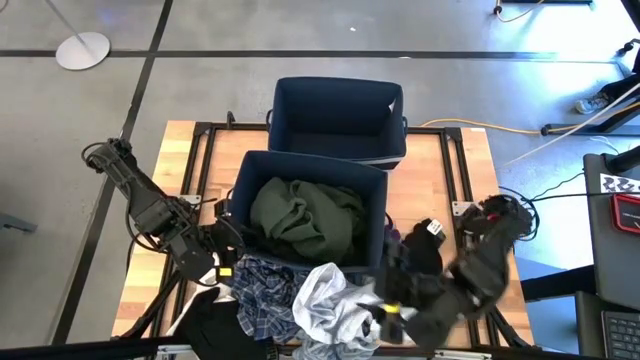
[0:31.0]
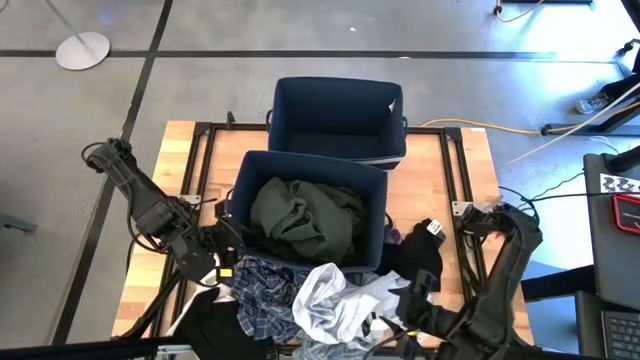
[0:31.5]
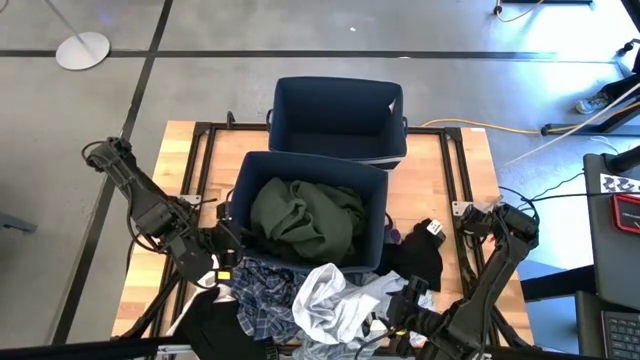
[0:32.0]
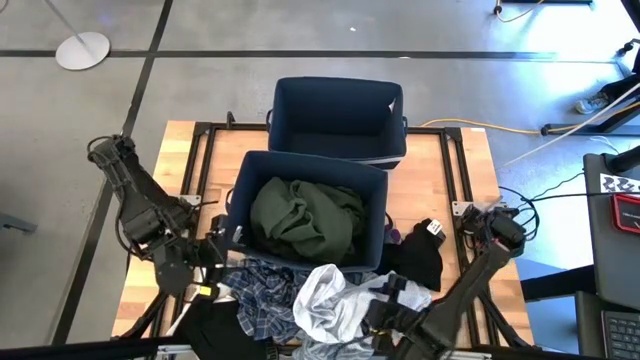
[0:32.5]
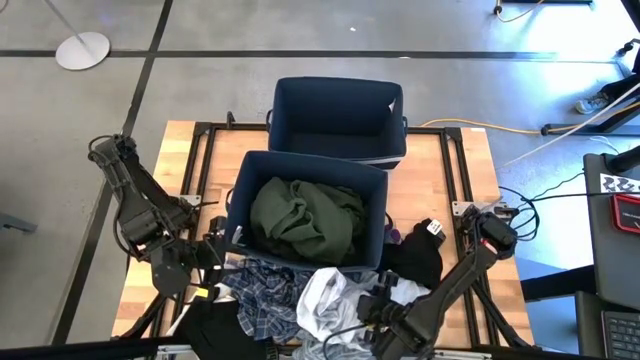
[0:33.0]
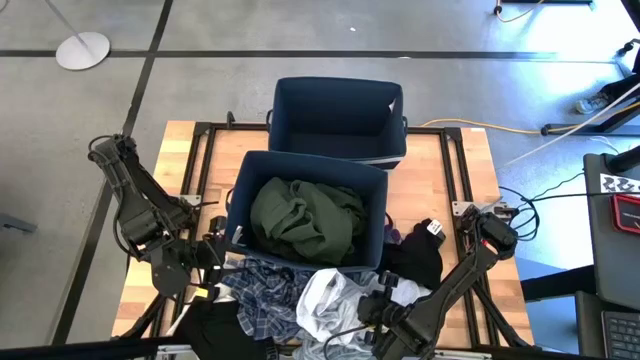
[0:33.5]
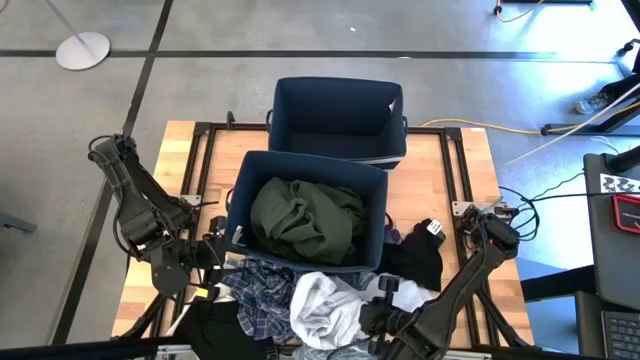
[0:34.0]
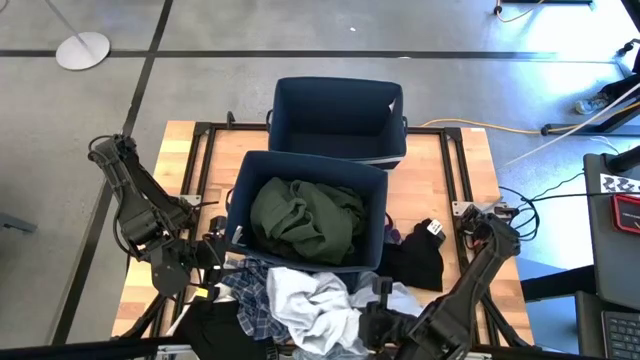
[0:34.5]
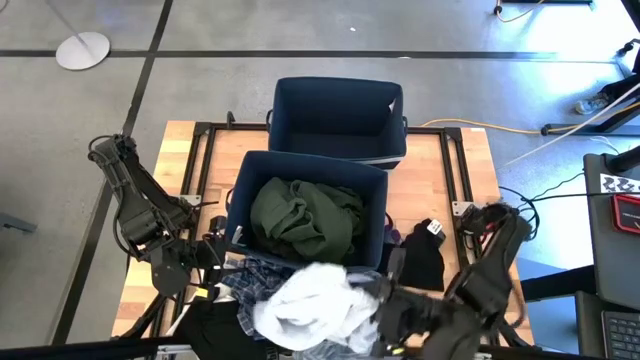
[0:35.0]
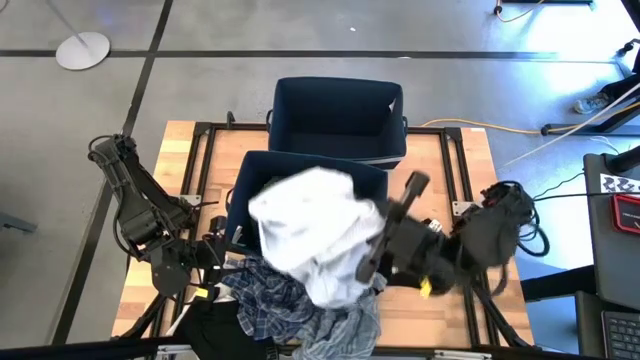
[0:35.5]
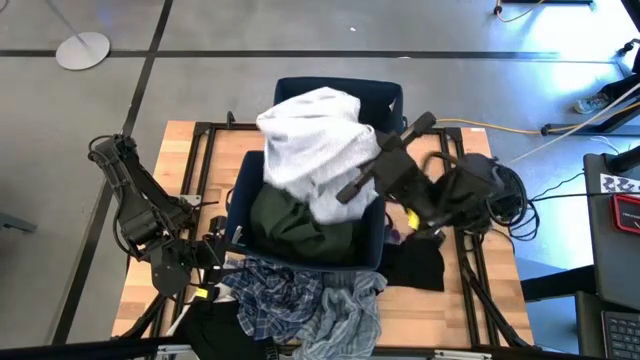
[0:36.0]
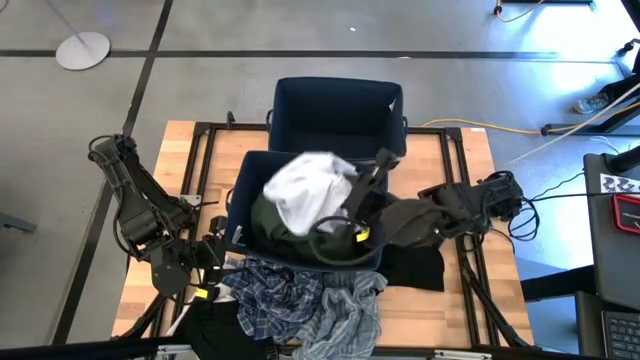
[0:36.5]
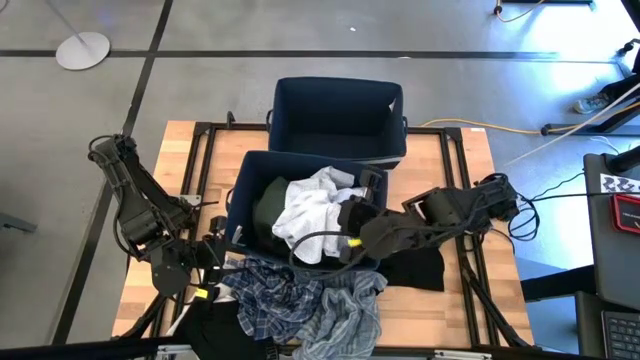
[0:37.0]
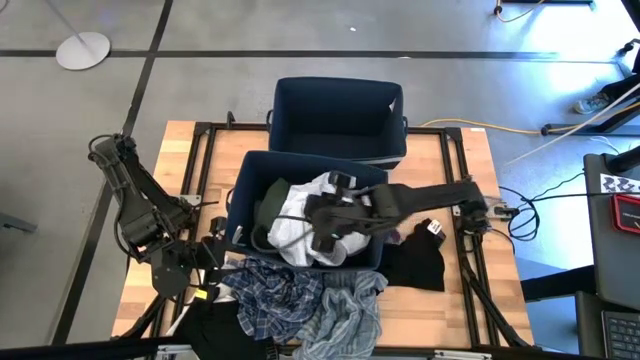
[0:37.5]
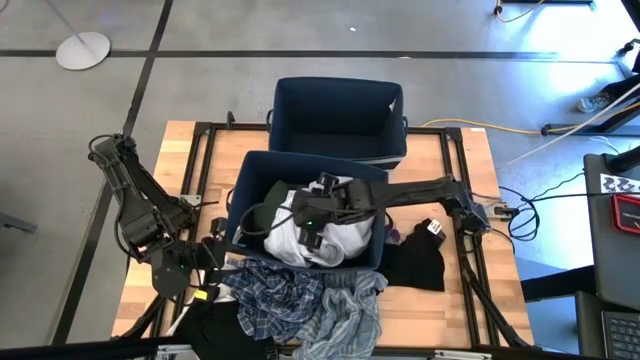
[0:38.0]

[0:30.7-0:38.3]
Task: Sort clothes
Put the light blue polo shirt into the bottom blue laundry bin

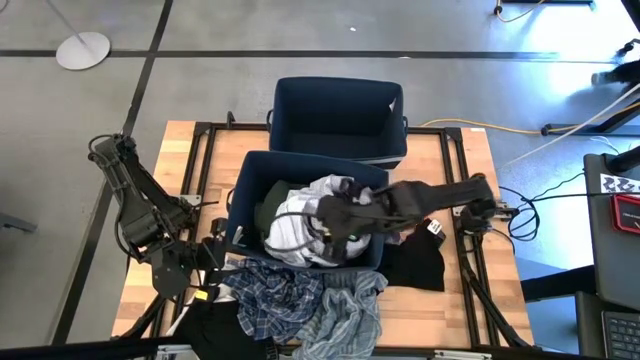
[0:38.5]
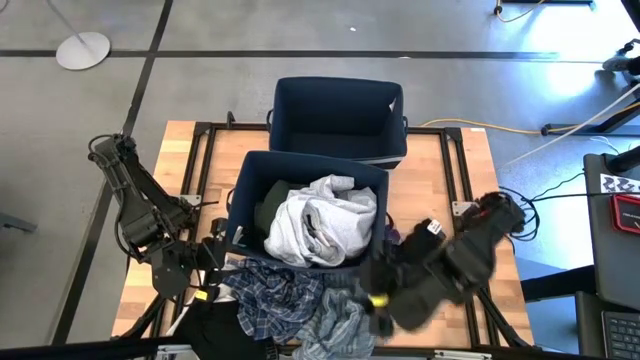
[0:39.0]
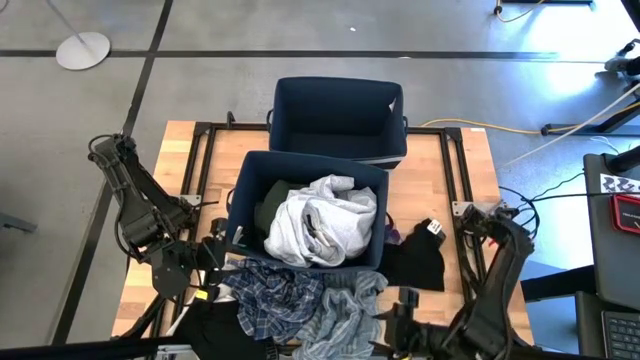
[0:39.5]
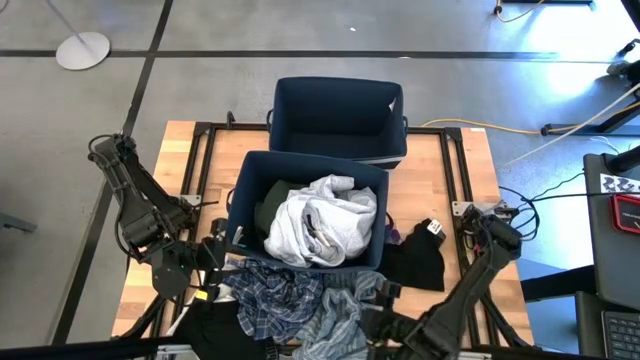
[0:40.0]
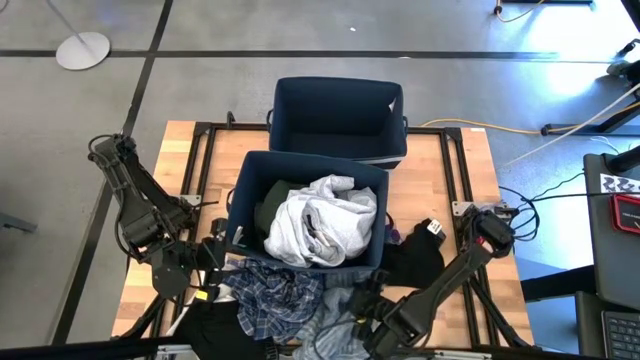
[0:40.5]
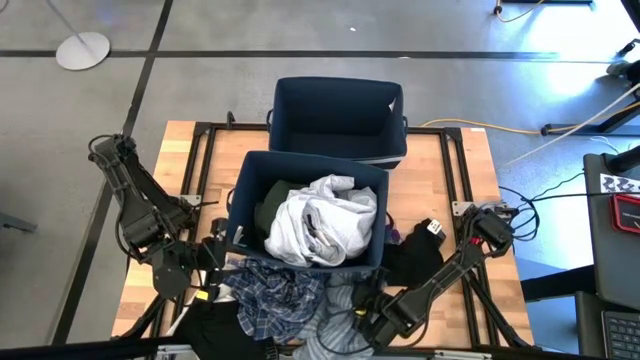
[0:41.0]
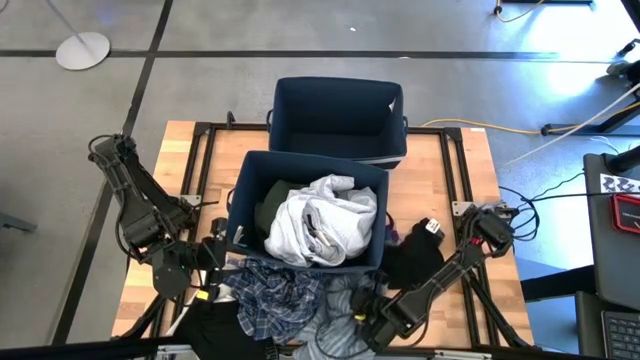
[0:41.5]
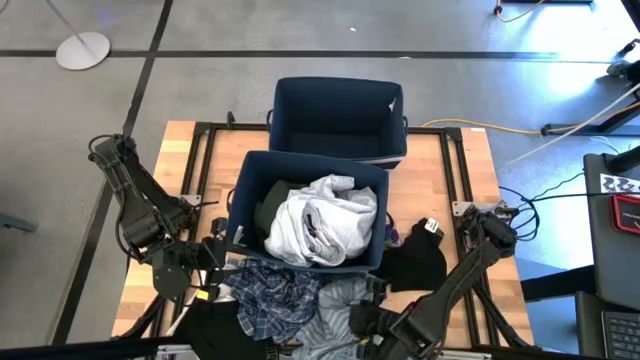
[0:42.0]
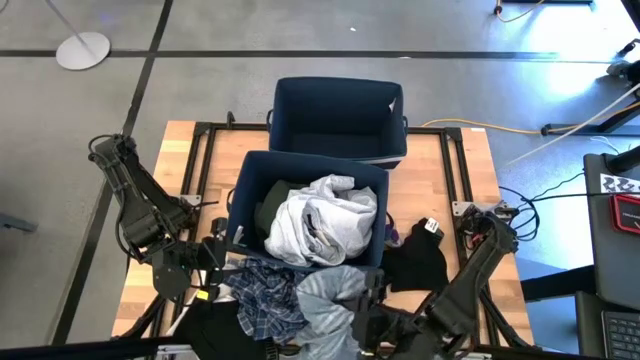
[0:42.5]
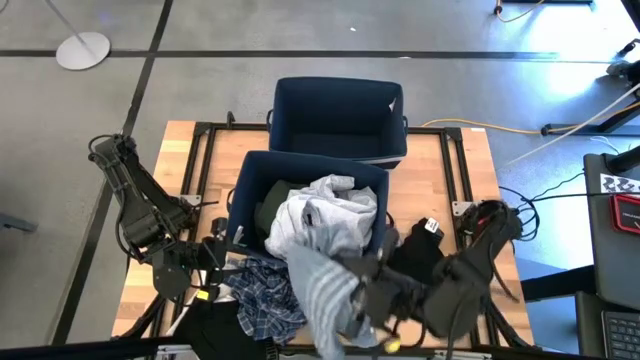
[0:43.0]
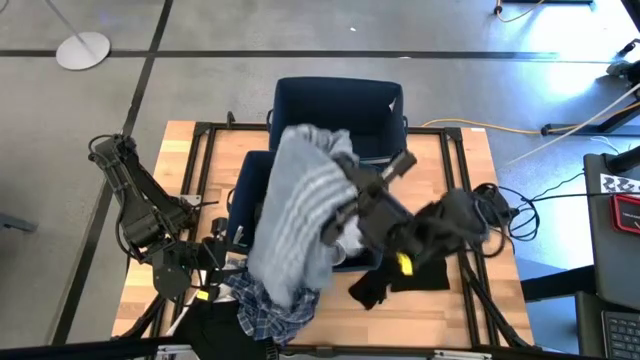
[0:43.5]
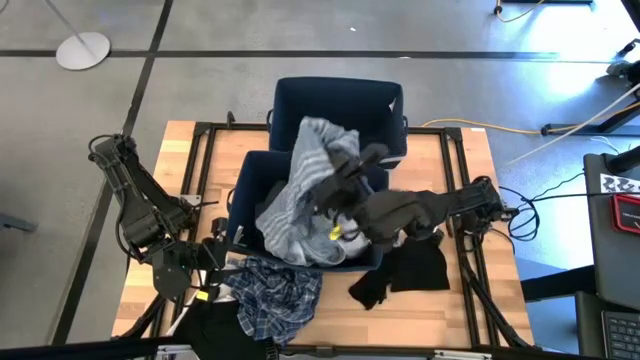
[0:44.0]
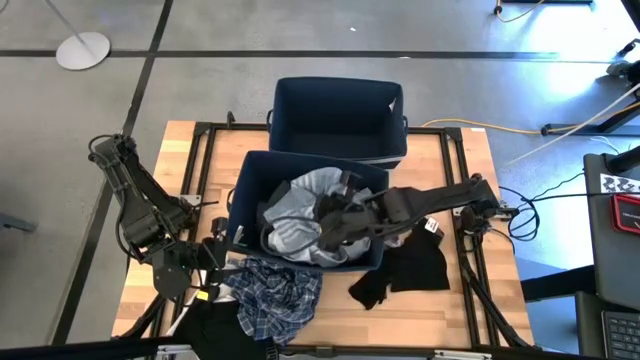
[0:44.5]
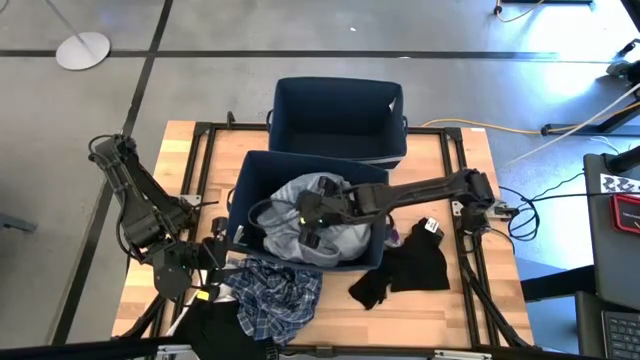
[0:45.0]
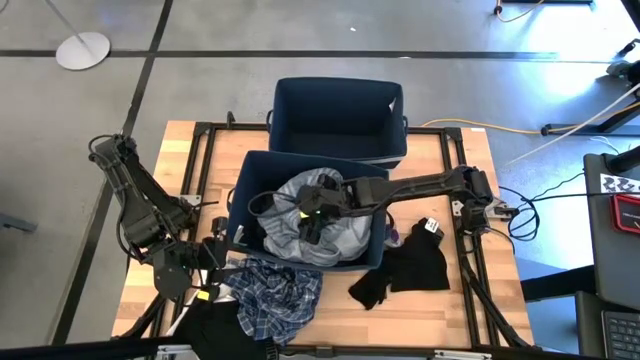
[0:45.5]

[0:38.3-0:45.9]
Put the light blue cloth into the bottom blue laundry bin

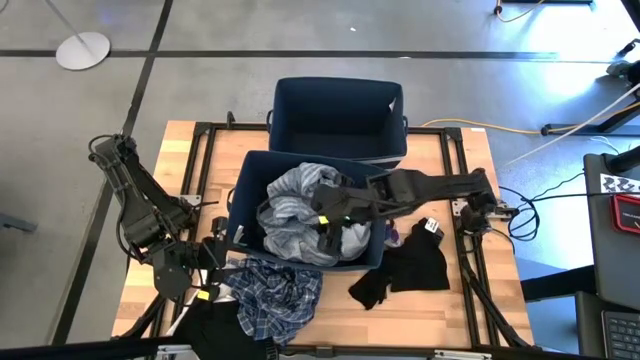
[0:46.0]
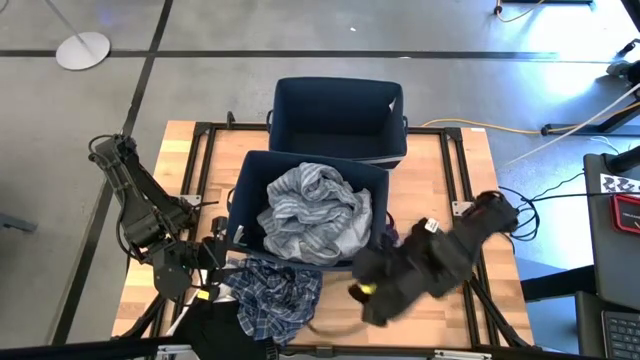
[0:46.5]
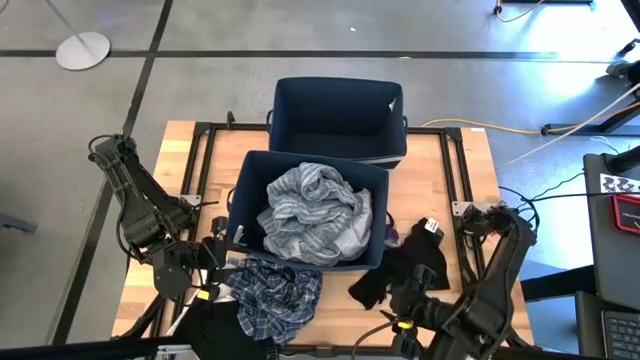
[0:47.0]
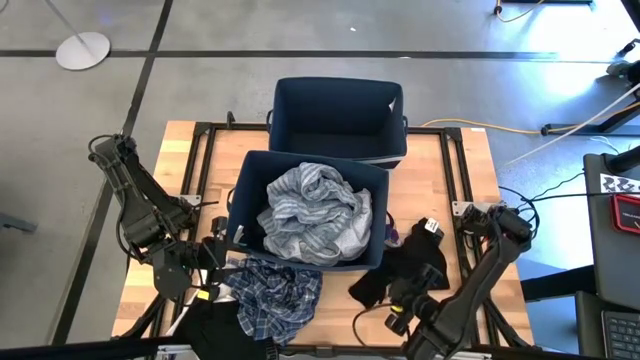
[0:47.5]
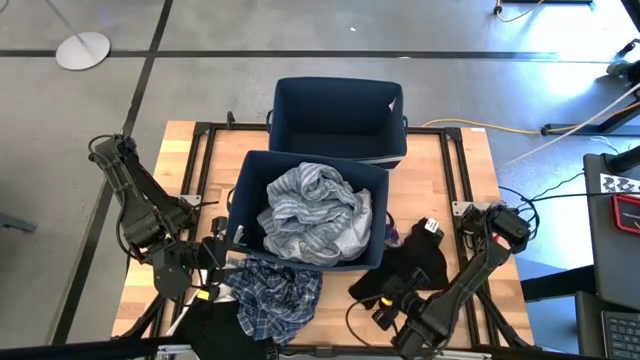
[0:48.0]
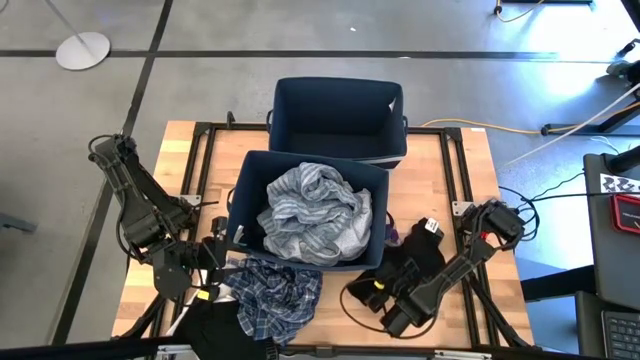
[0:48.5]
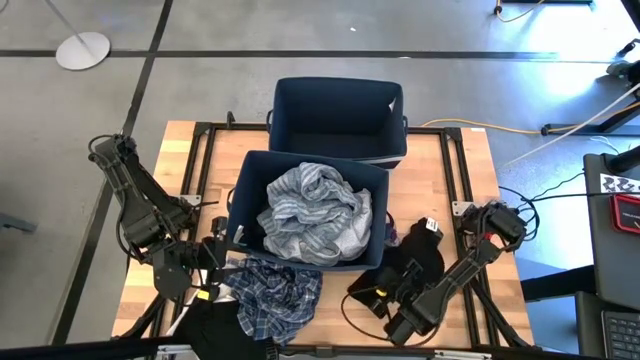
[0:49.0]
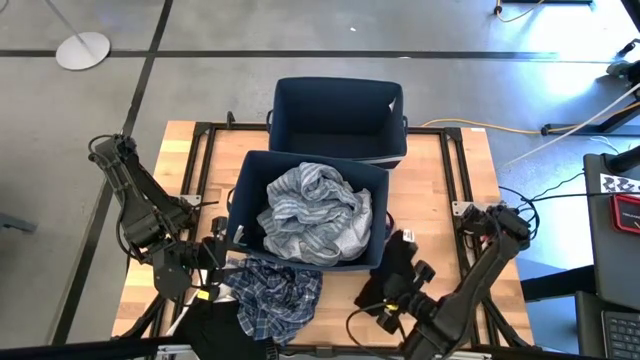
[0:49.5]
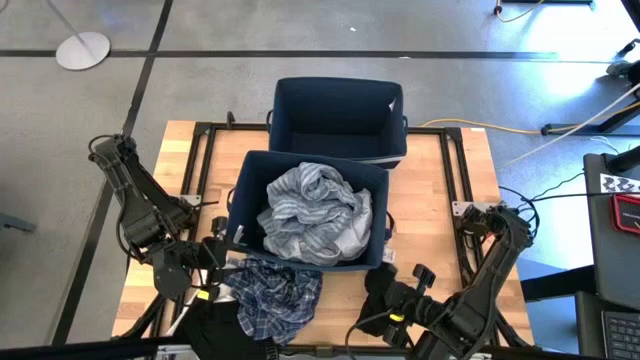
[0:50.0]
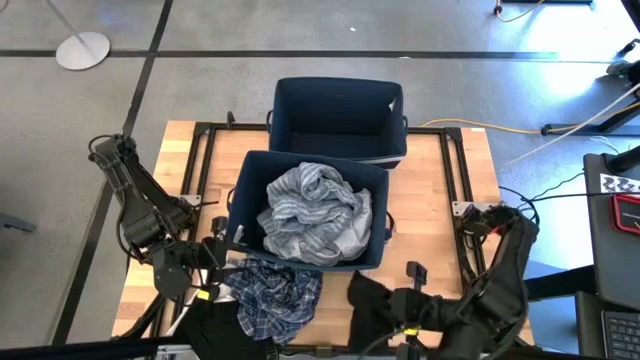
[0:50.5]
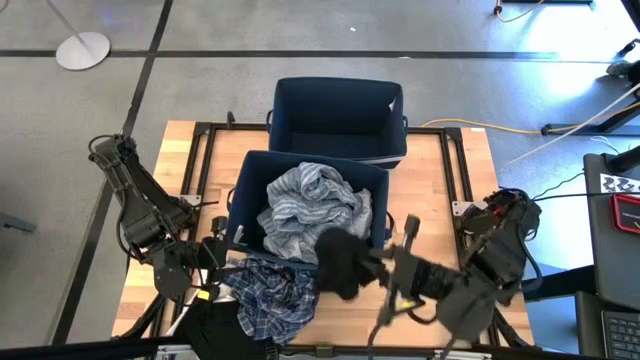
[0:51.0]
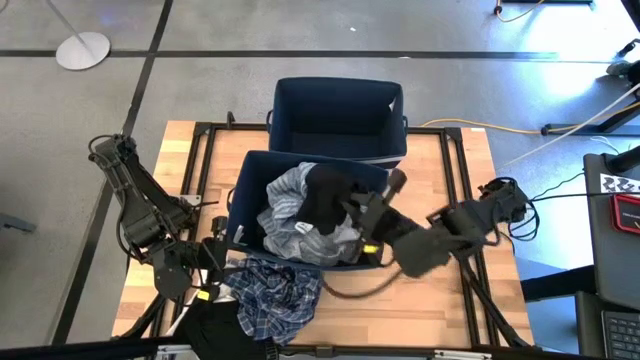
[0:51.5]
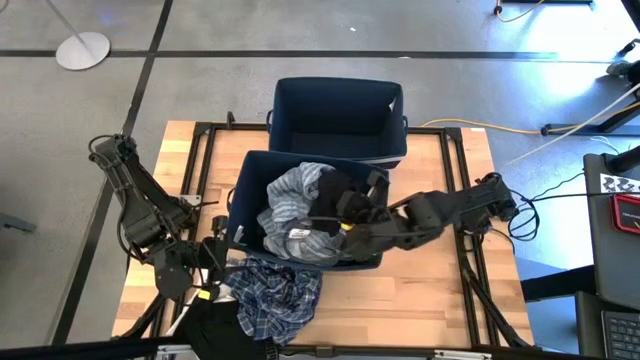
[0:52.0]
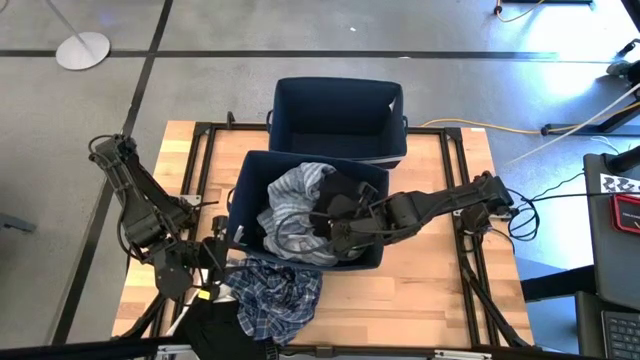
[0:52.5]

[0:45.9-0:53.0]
Put the black boxer into the bottom blue laundry bin
